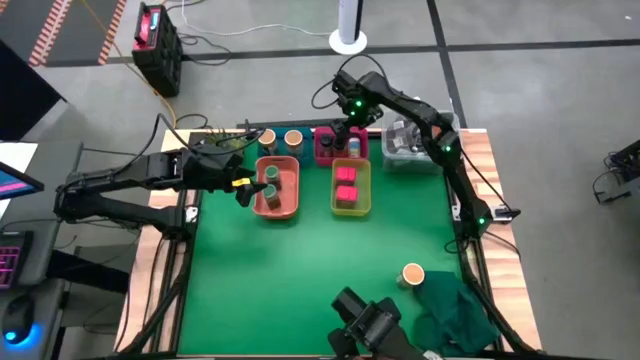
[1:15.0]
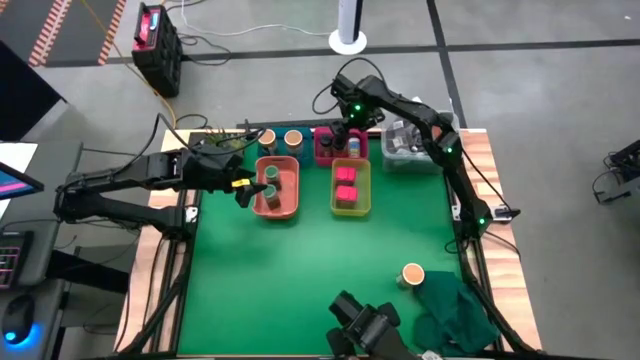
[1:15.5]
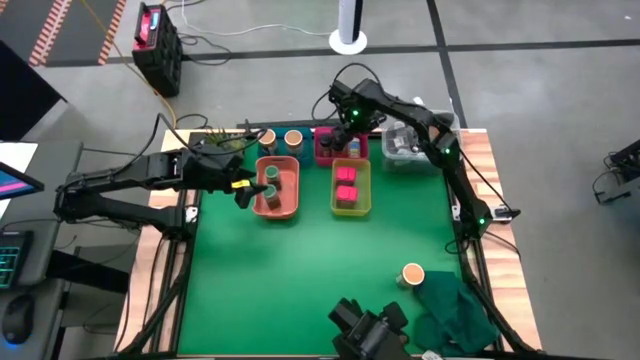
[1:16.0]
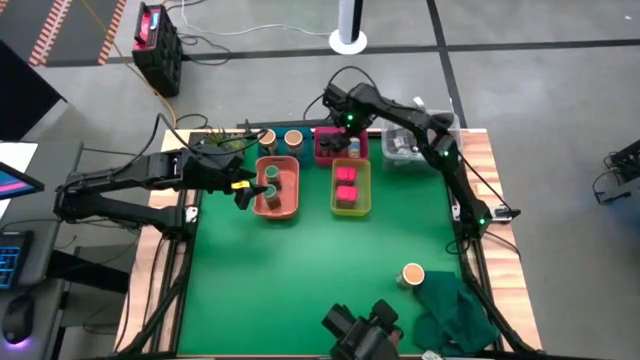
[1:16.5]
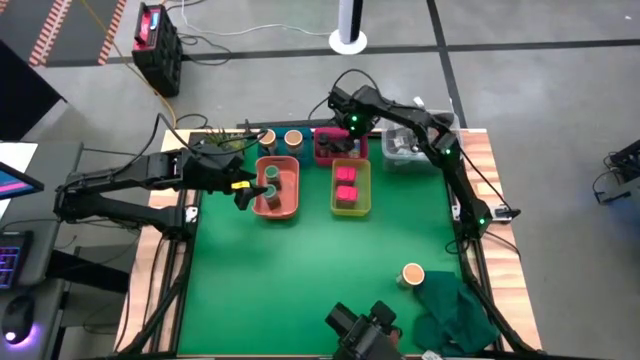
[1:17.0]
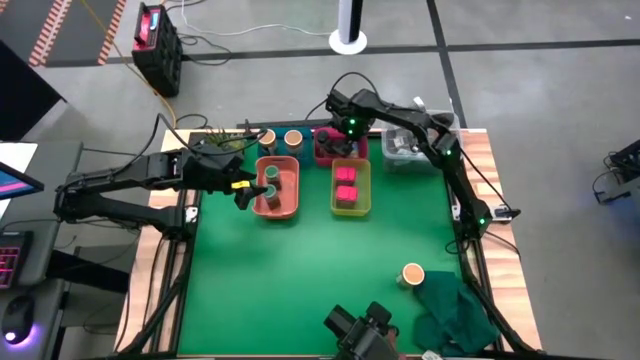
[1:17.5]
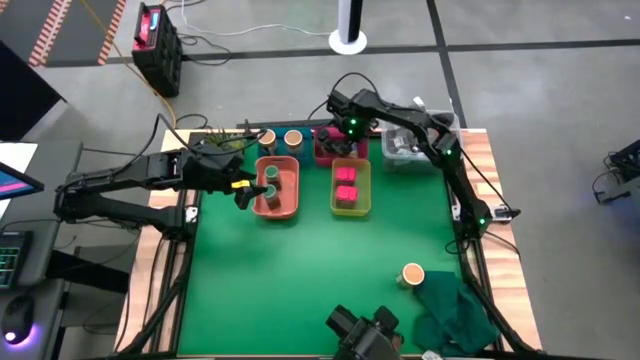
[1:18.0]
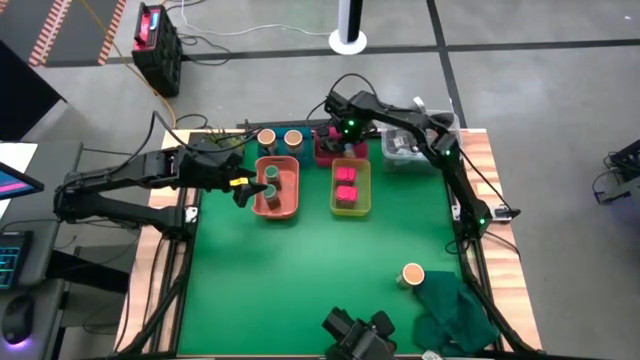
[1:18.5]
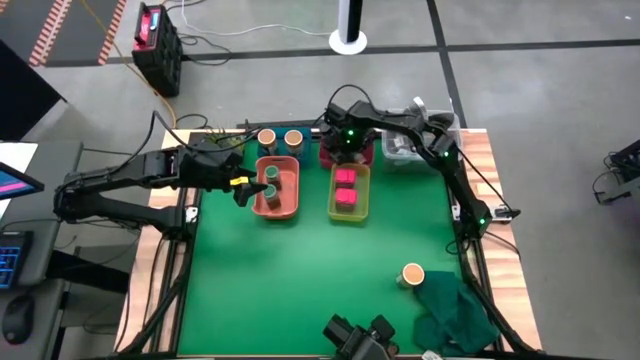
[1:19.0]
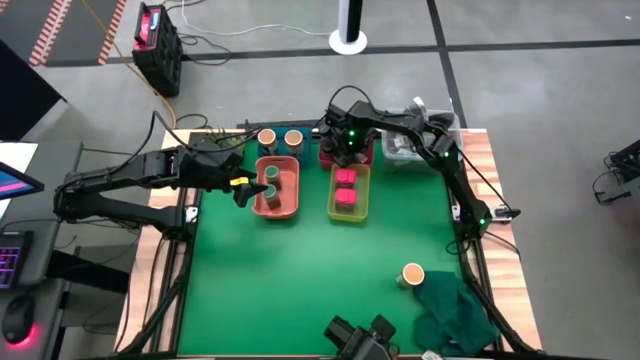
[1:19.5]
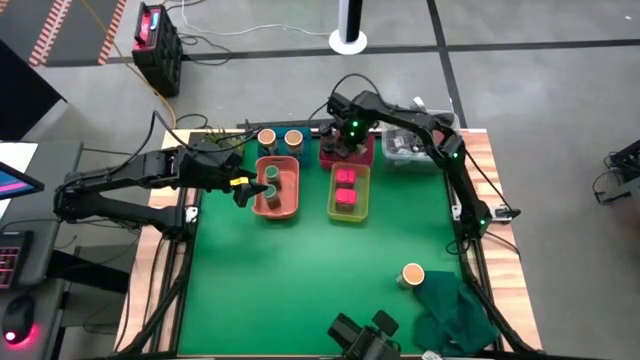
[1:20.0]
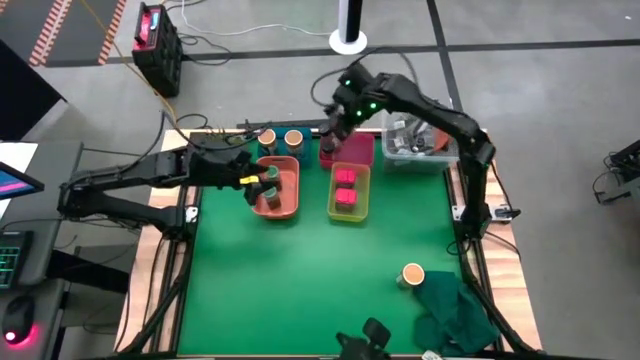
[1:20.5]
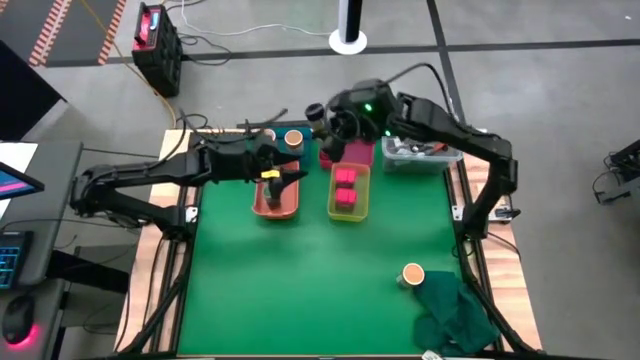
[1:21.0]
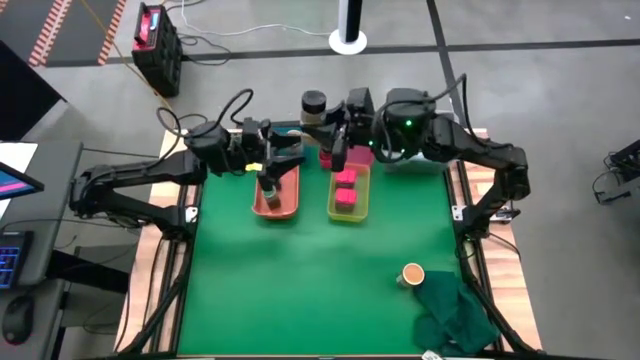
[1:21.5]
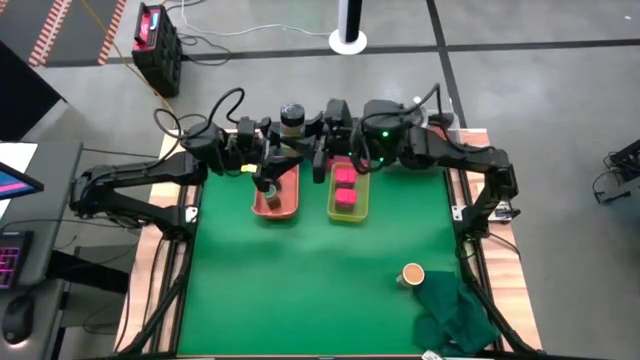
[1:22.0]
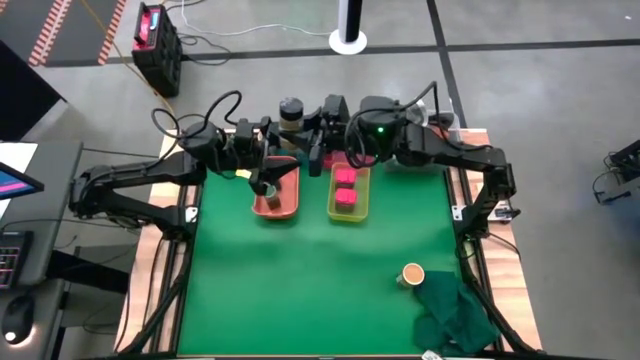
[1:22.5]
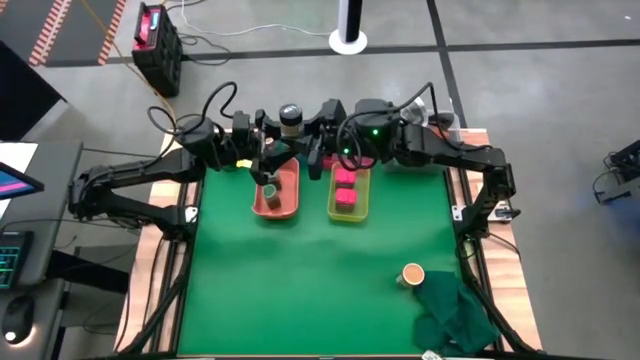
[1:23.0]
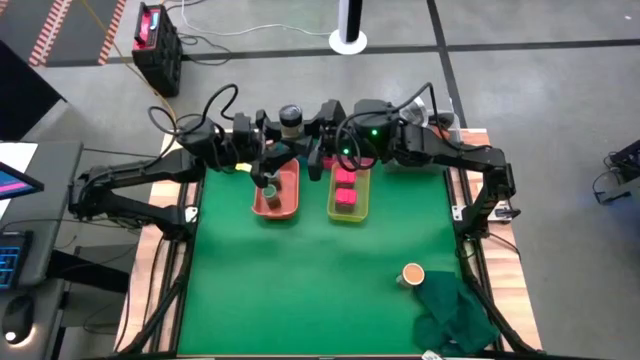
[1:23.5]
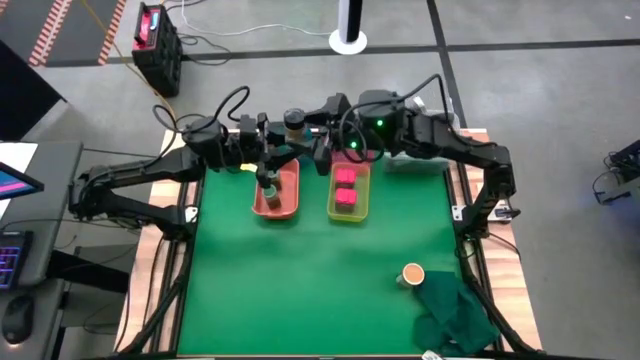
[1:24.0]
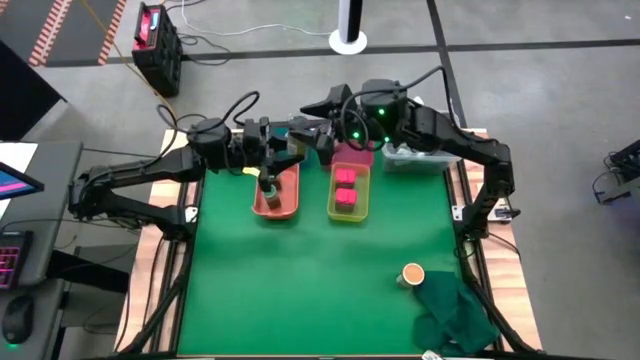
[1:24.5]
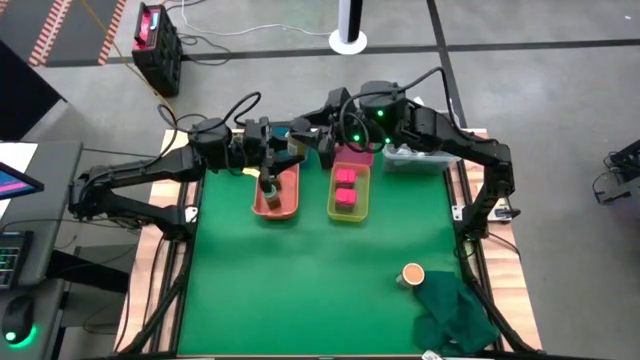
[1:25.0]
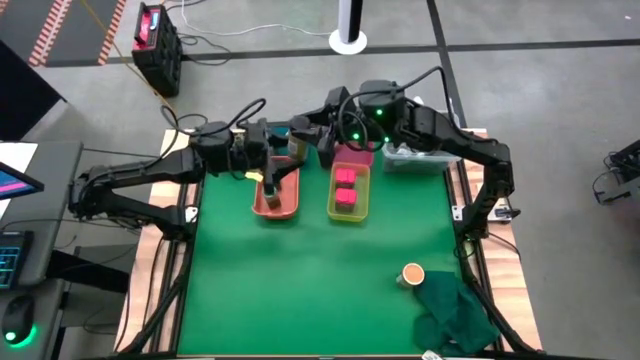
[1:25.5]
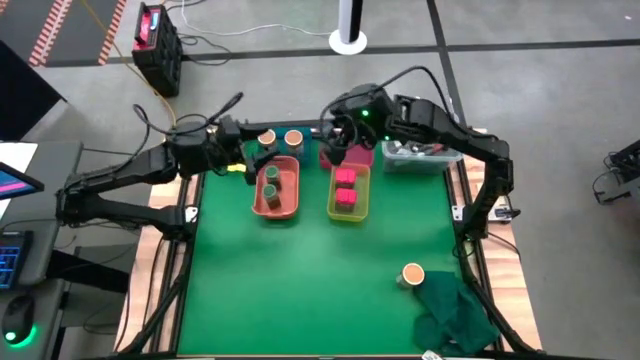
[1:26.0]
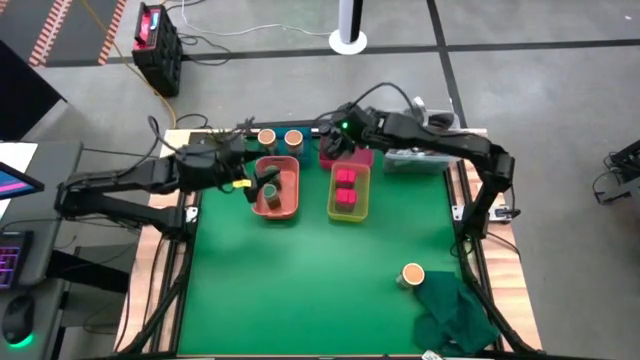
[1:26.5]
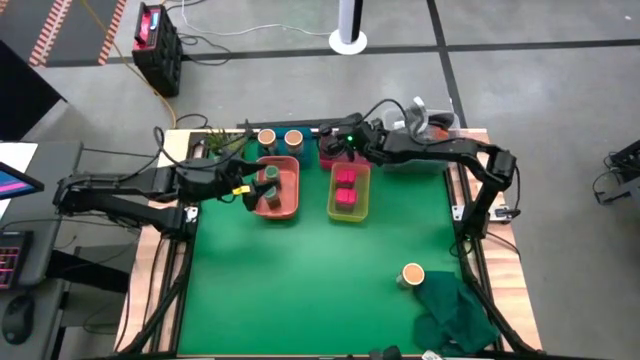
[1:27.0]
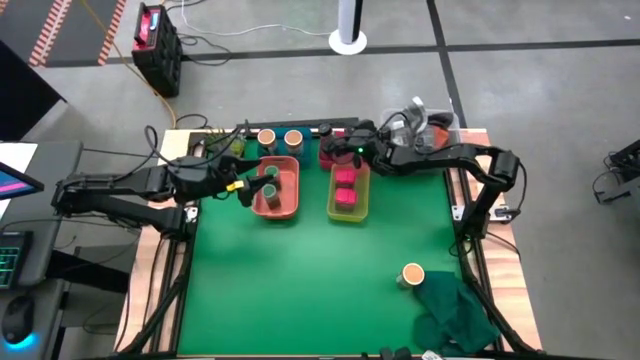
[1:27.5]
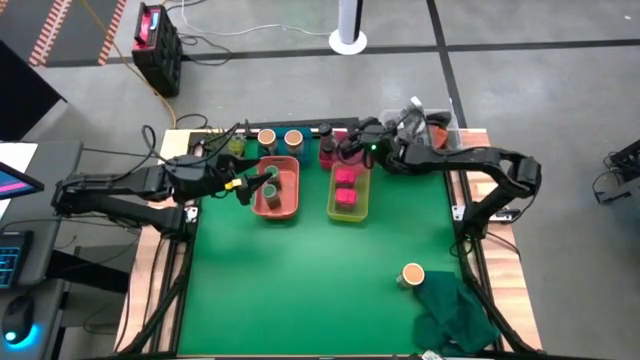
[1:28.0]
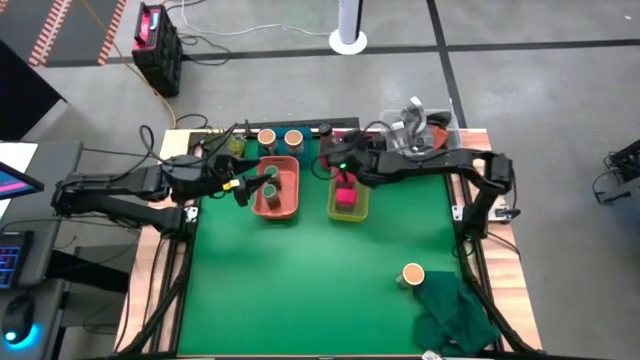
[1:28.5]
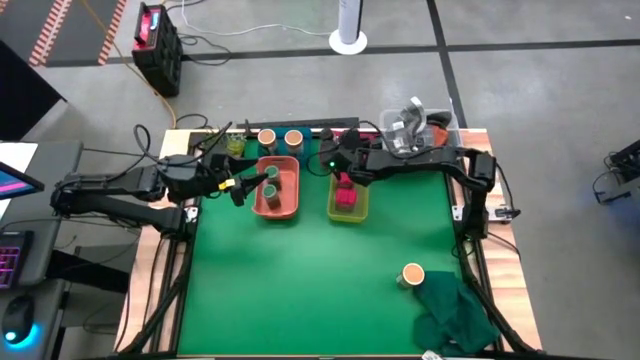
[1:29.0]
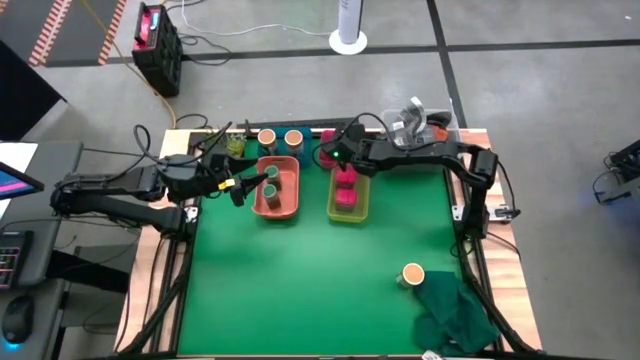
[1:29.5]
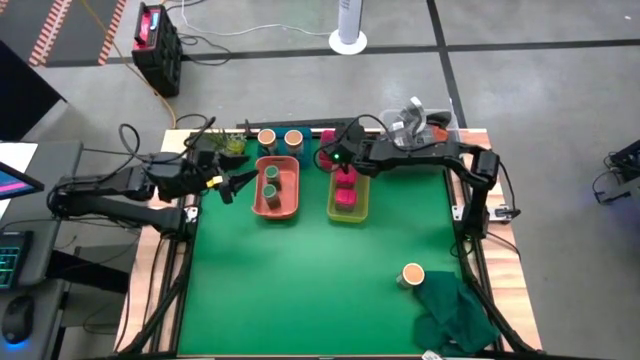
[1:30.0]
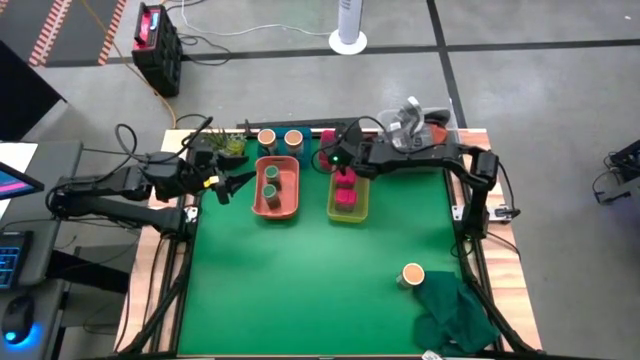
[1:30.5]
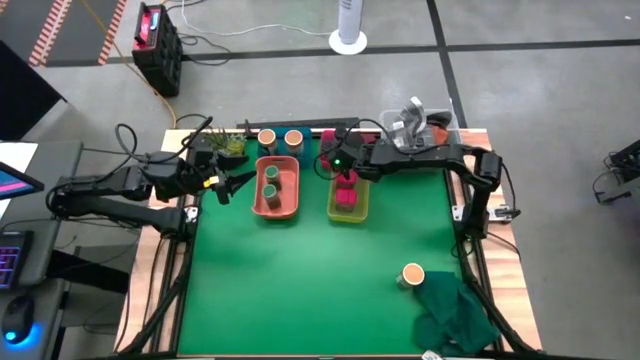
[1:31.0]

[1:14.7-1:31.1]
Task: Sort spices by type
Put the black seasoning bottle into the red bin upright

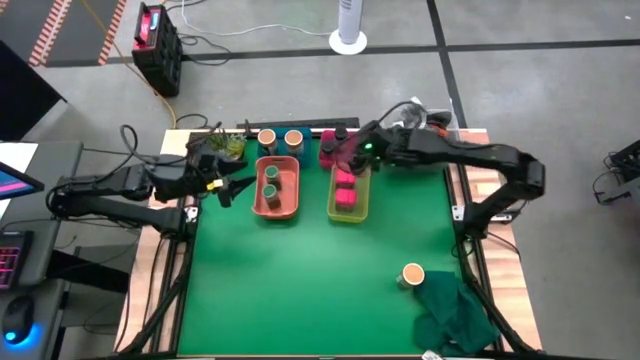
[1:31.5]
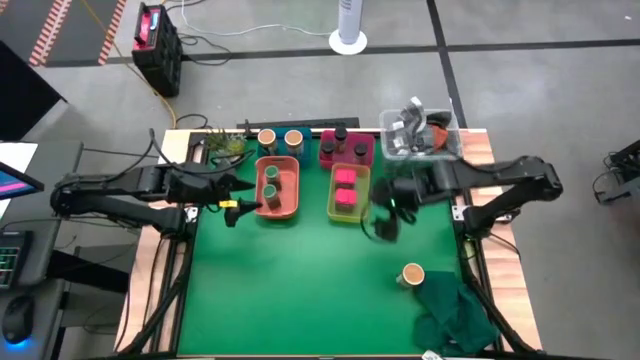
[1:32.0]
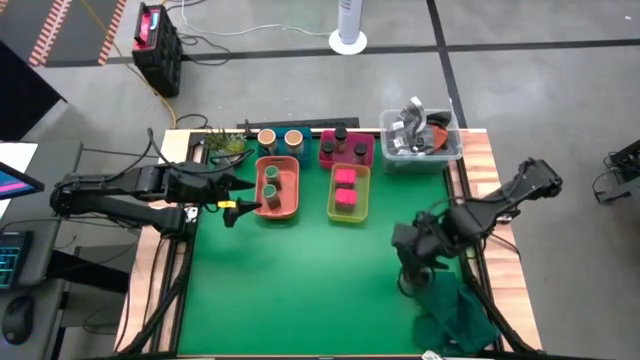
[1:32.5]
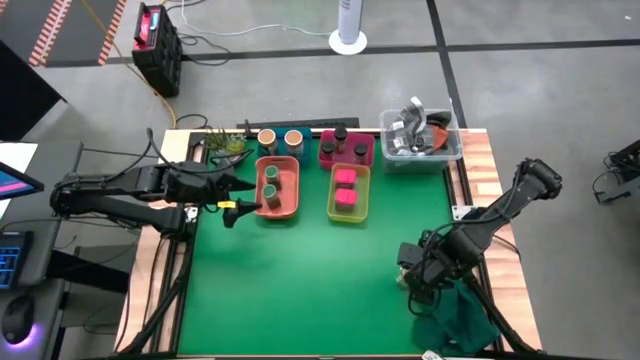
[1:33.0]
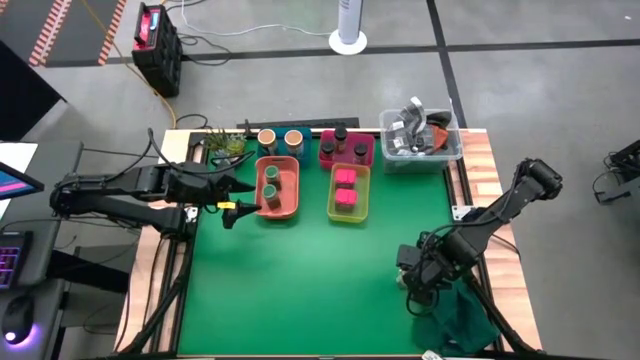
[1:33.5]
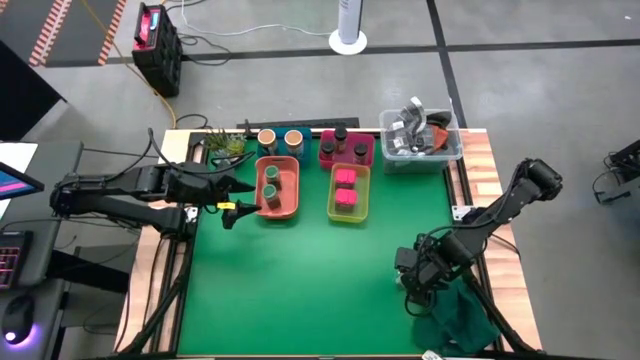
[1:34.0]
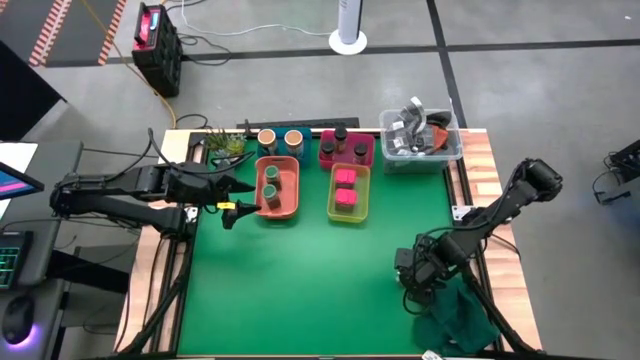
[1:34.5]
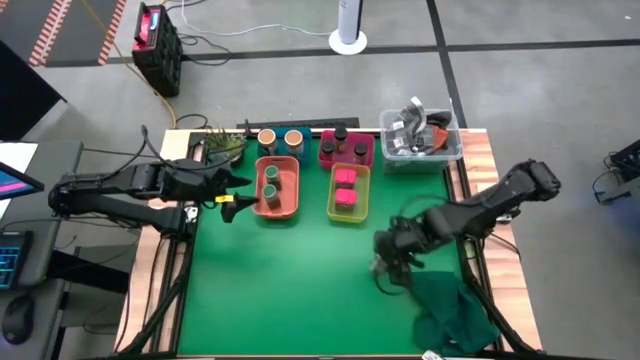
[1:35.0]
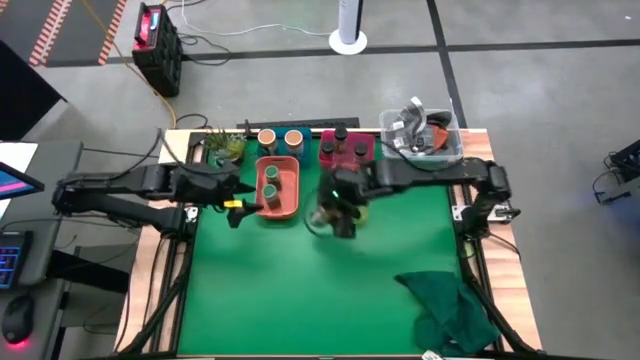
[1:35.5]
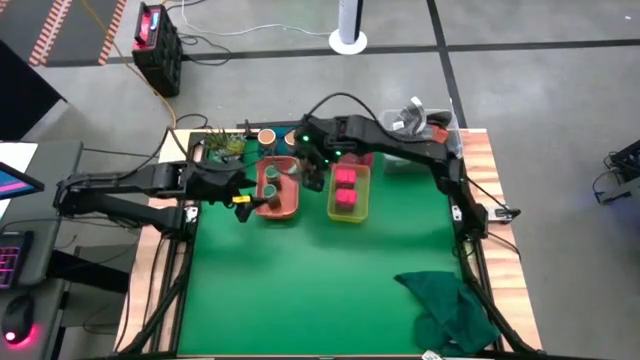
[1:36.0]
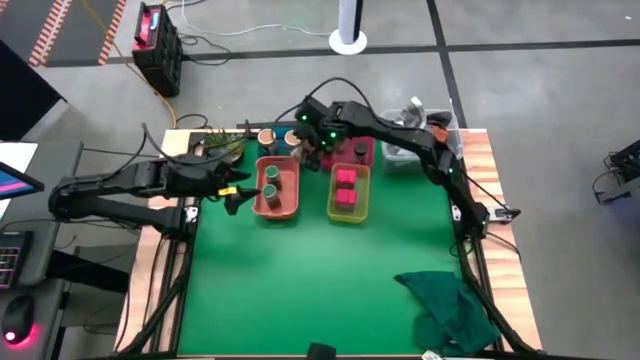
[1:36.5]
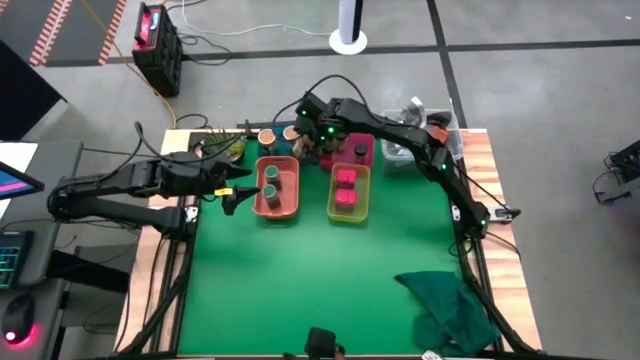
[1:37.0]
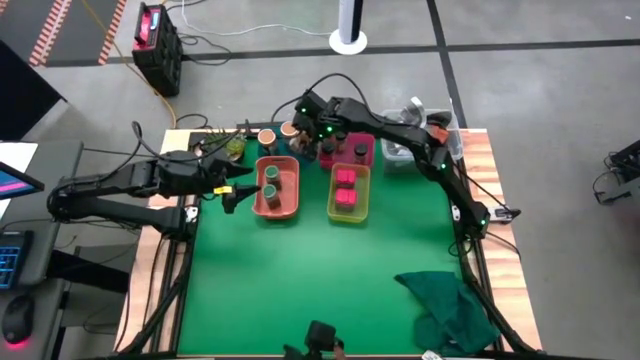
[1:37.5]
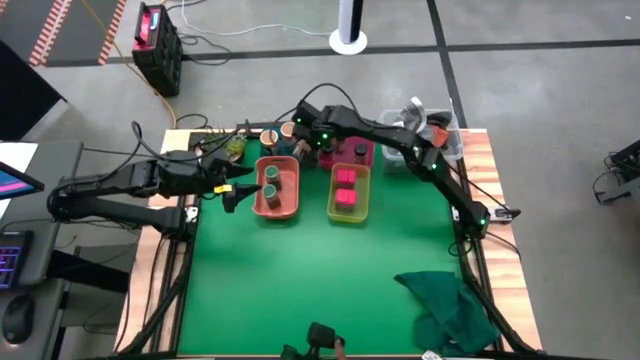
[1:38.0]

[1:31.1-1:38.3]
Put the brown seasoning bottle into the blue bin
